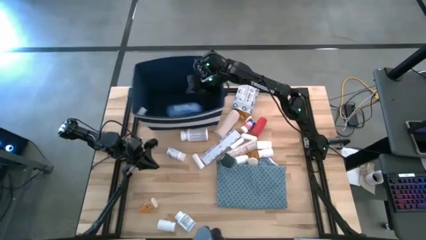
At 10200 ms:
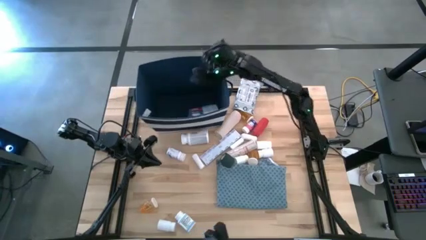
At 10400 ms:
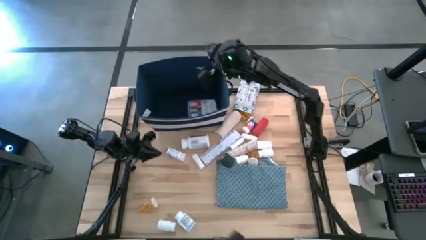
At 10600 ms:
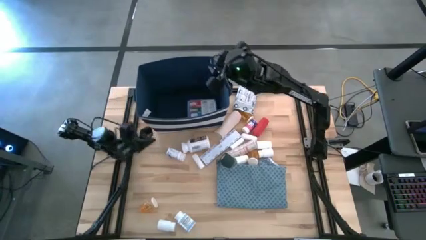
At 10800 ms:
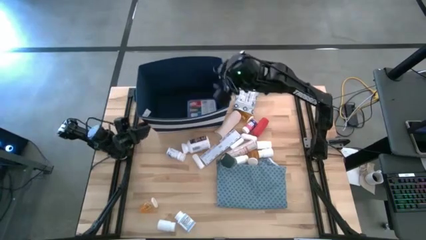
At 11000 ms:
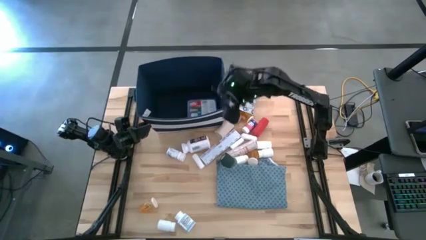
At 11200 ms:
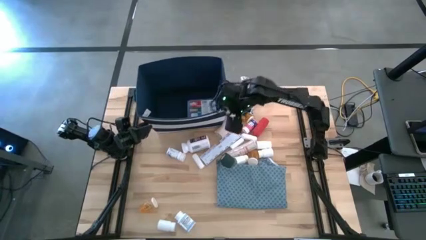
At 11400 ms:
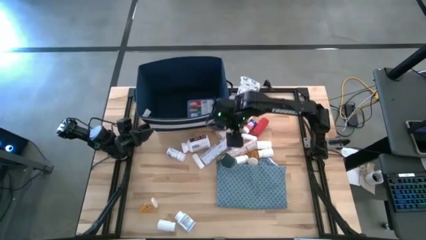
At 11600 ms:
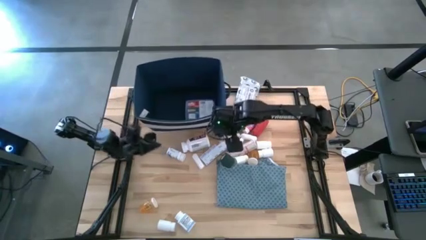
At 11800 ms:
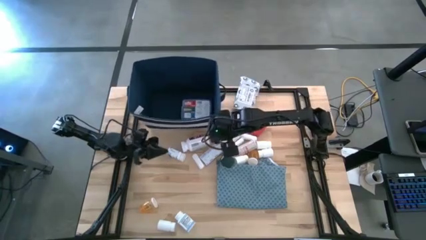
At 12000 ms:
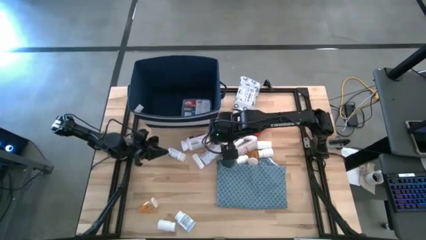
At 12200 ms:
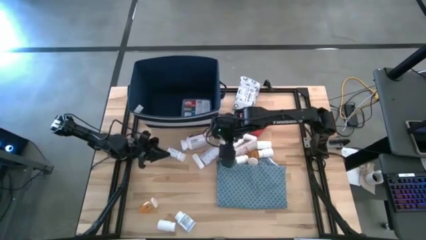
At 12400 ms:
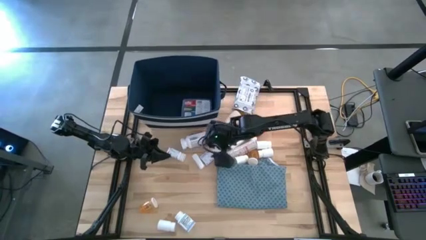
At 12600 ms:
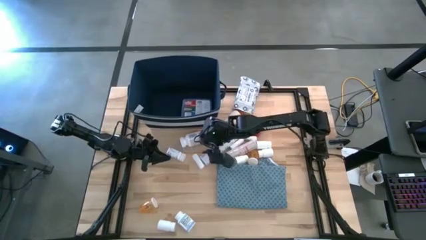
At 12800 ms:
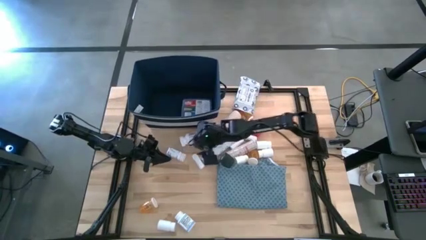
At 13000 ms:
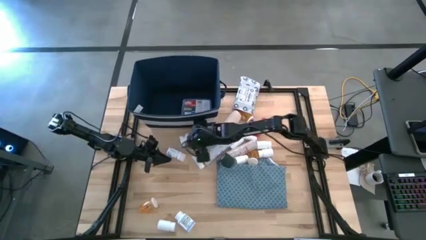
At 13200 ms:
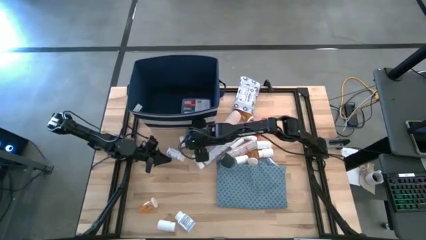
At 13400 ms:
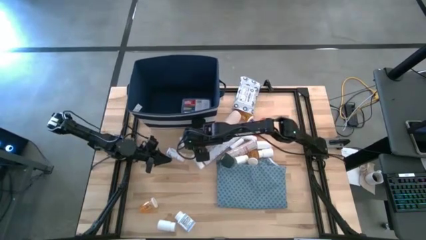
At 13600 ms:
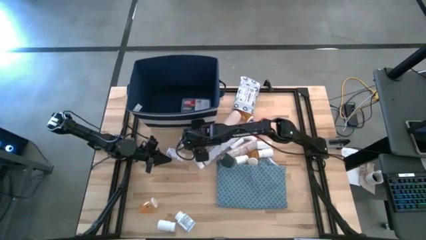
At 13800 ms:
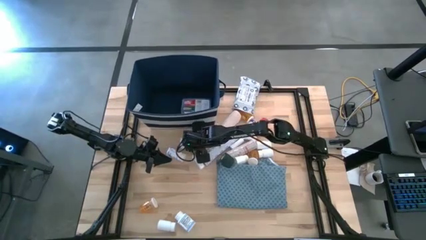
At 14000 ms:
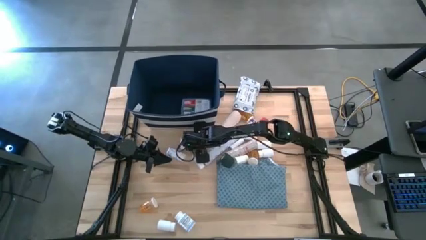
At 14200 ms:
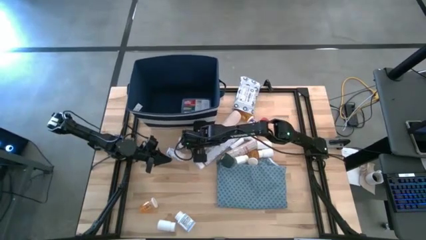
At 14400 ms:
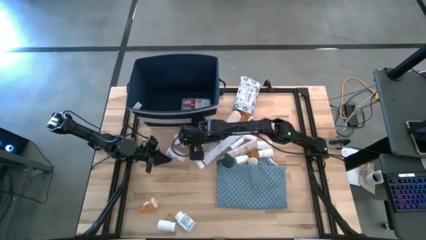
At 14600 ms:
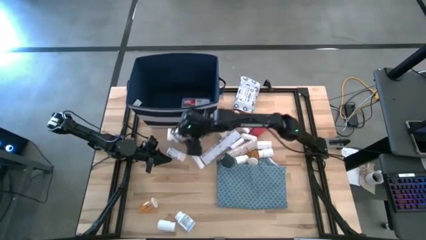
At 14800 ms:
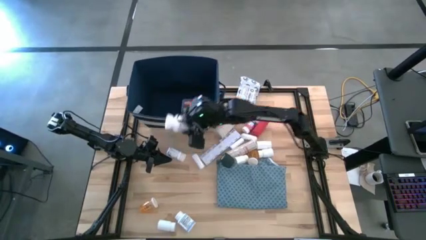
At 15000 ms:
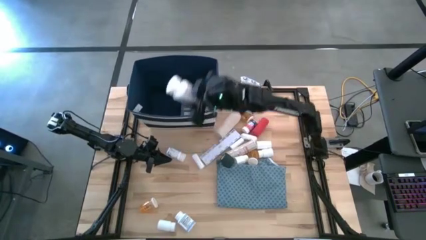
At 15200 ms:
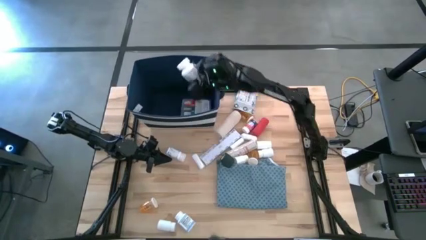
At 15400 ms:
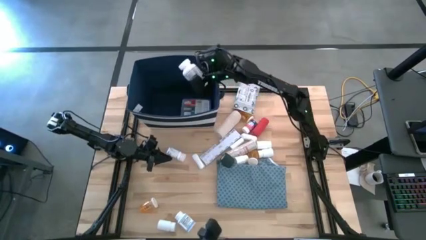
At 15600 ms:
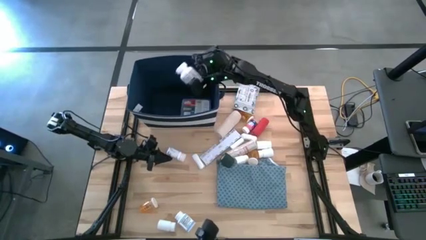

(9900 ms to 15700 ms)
Task: Pick & place medical supplies in basket/bin
Put the white medicine bottle into the blue bin

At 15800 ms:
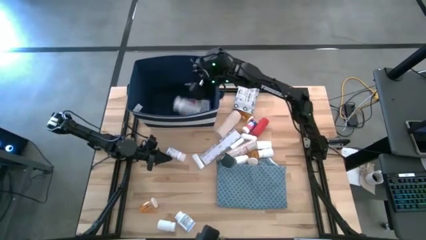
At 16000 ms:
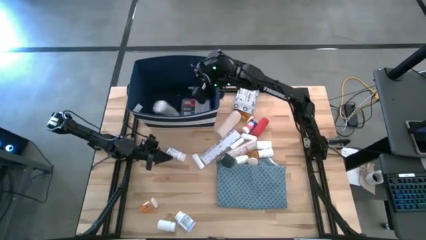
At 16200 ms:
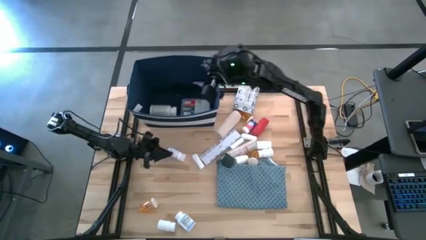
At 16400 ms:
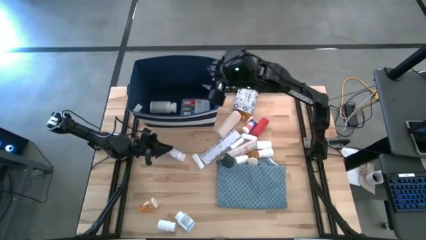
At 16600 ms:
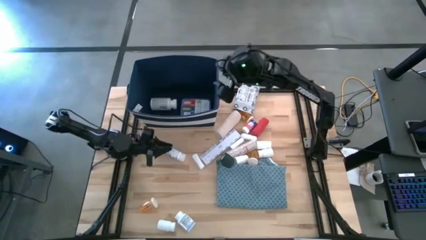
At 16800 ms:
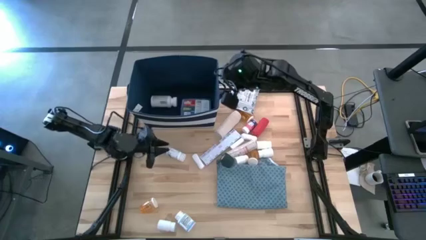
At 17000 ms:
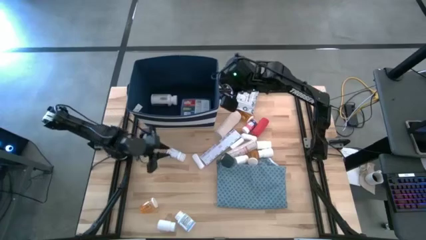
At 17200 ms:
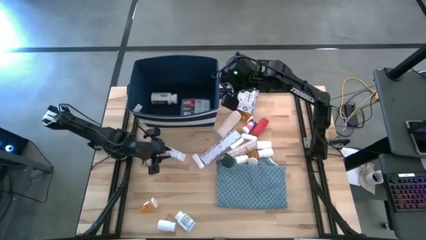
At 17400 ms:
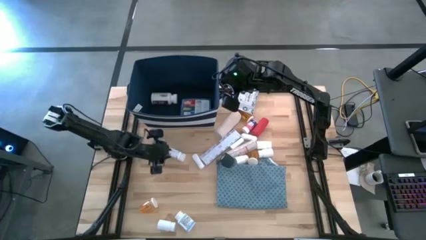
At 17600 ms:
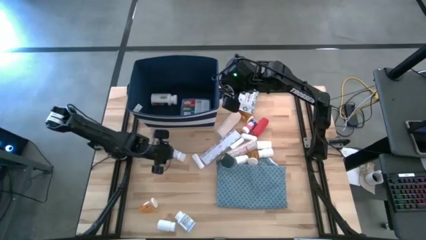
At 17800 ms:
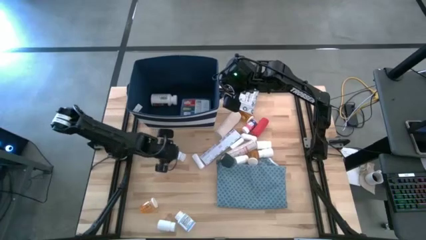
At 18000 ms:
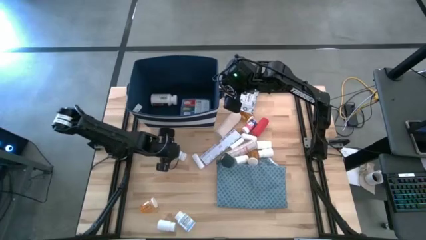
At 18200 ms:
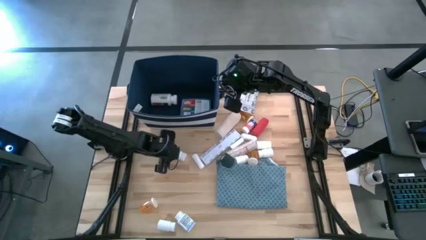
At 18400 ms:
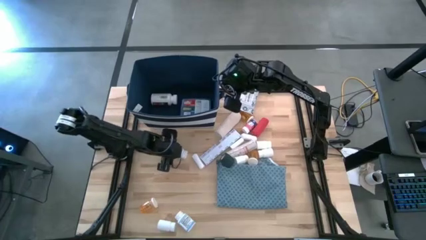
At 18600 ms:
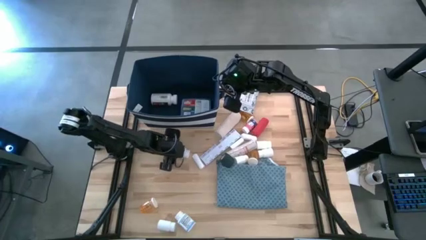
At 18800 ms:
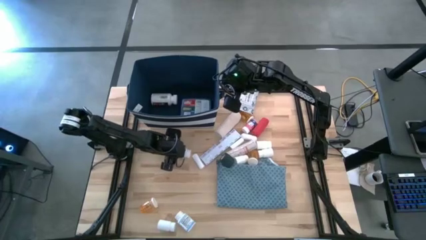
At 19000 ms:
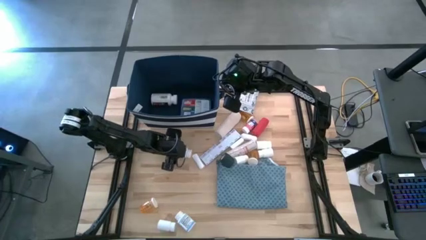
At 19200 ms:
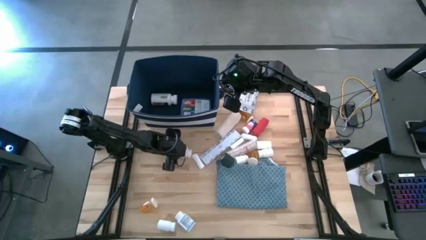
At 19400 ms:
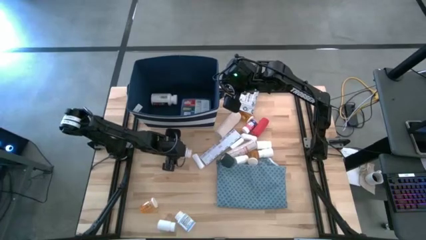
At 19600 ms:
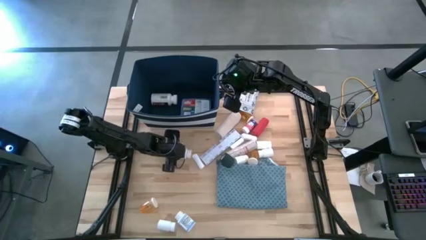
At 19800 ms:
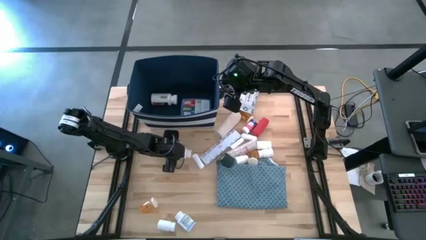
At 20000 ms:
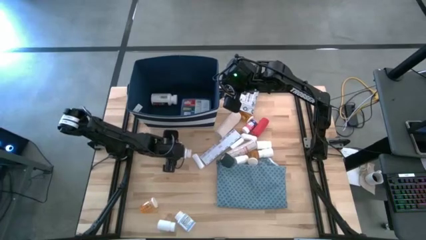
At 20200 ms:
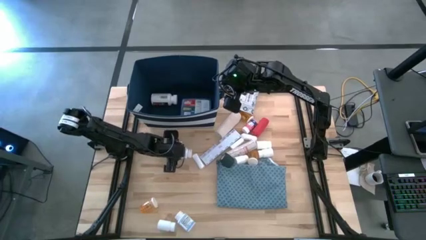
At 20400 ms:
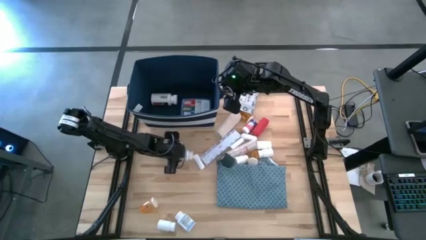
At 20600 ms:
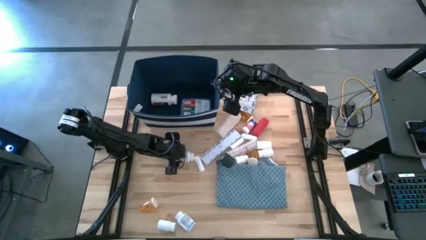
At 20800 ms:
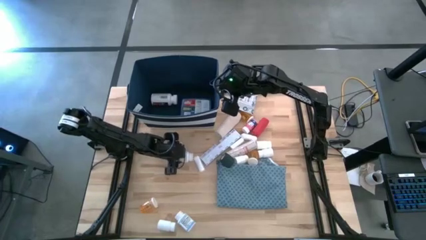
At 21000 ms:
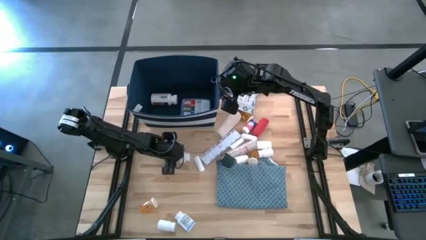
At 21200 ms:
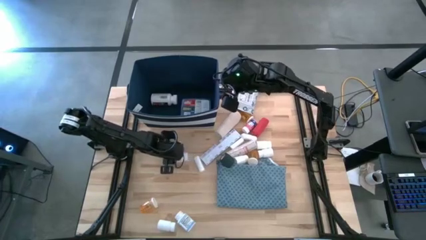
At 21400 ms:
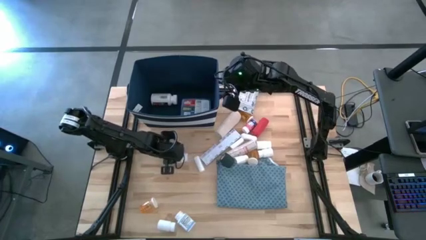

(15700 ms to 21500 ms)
Put the blue medicine bottle into the blue bin

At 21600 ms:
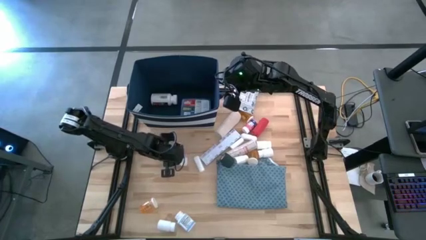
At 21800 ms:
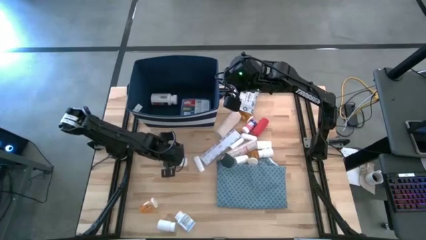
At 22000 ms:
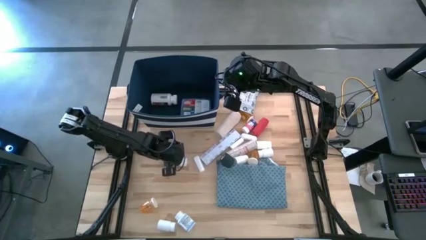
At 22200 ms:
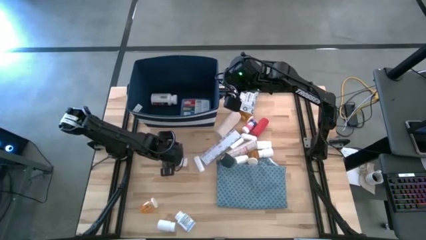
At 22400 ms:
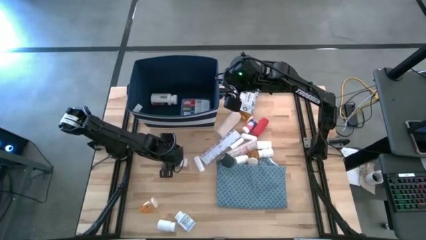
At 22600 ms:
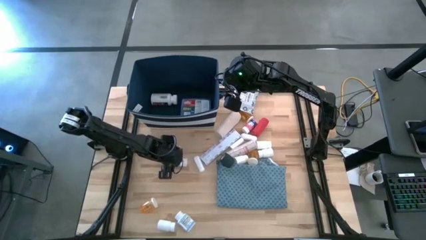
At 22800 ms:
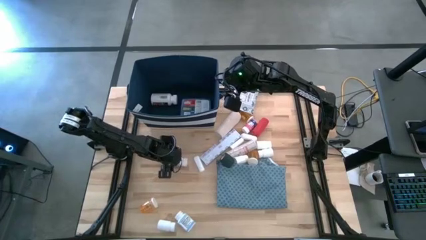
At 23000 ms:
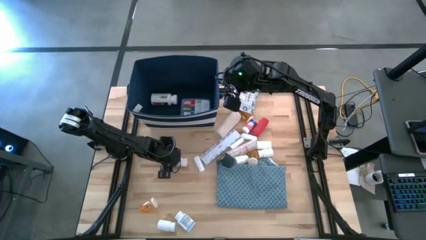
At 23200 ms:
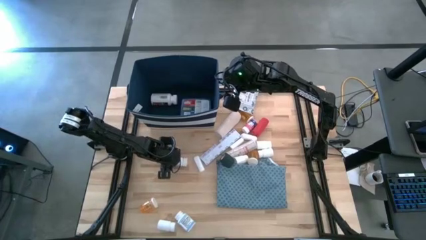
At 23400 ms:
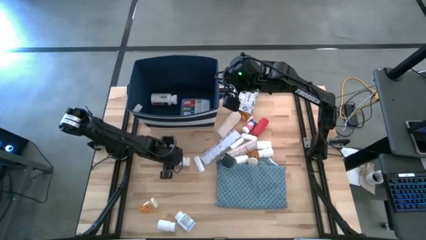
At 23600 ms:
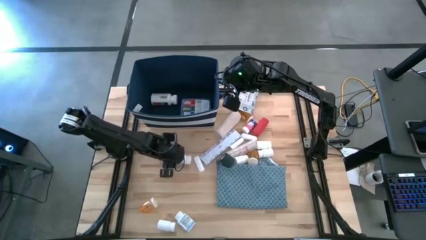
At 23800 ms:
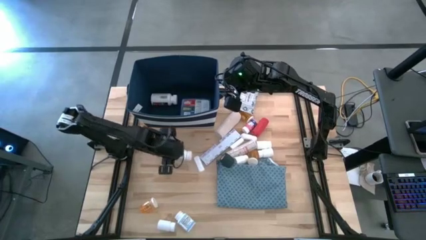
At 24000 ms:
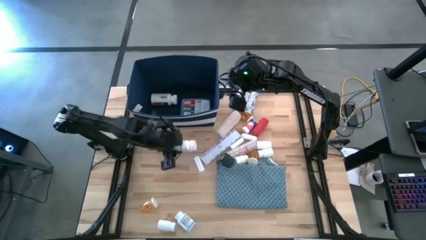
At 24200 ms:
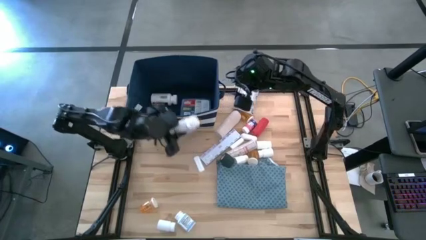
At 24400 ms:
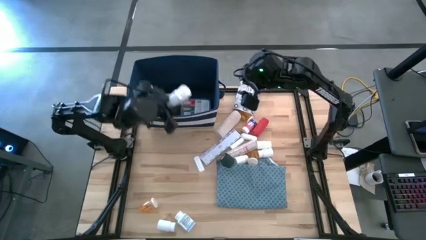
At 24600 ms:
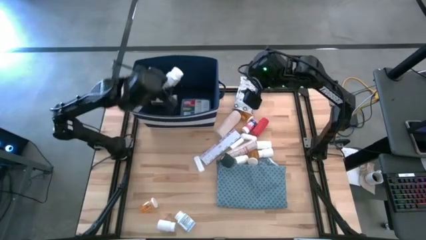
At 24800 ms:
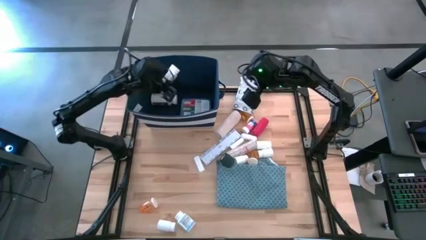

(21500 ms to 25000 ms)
Put the blue medicine bottle into the blue bin
